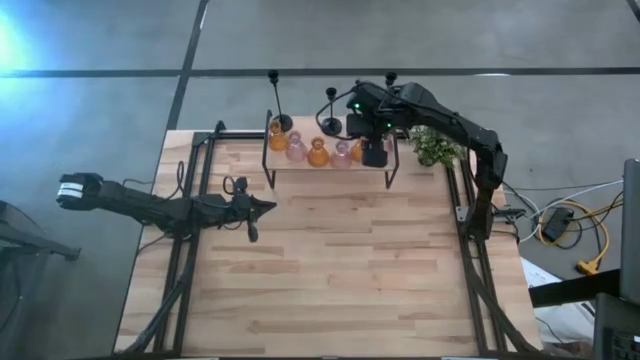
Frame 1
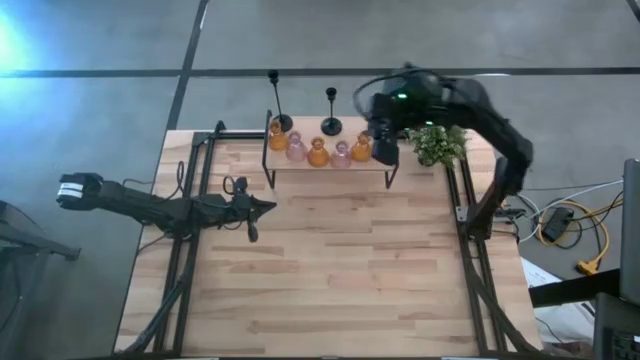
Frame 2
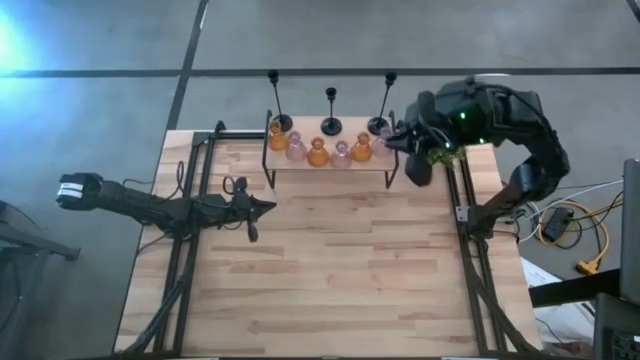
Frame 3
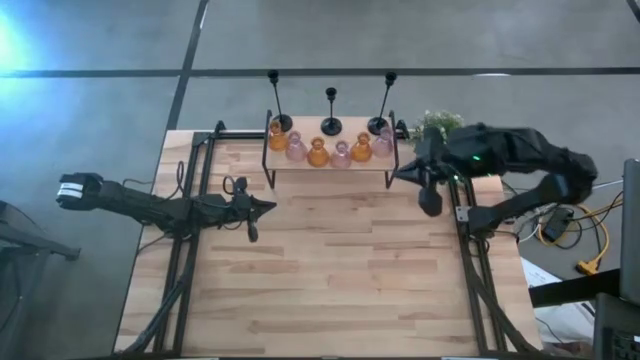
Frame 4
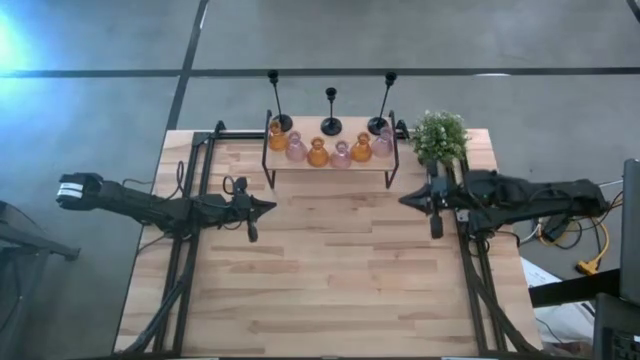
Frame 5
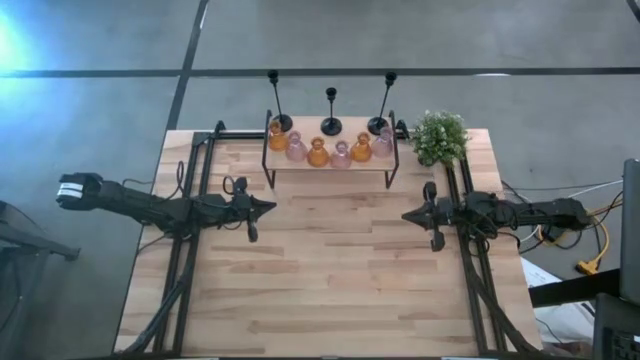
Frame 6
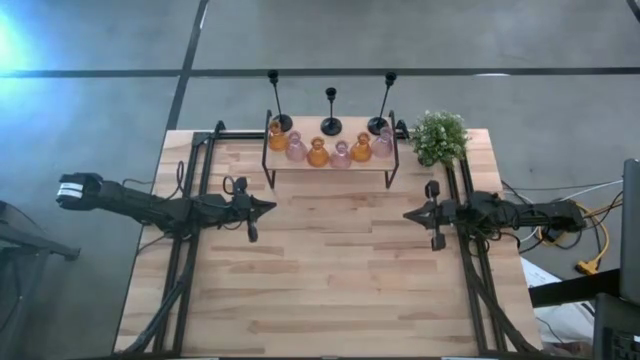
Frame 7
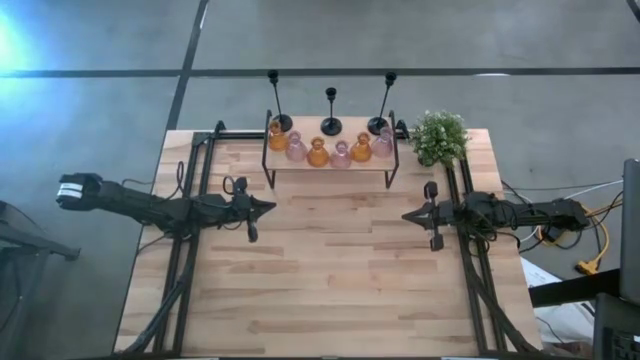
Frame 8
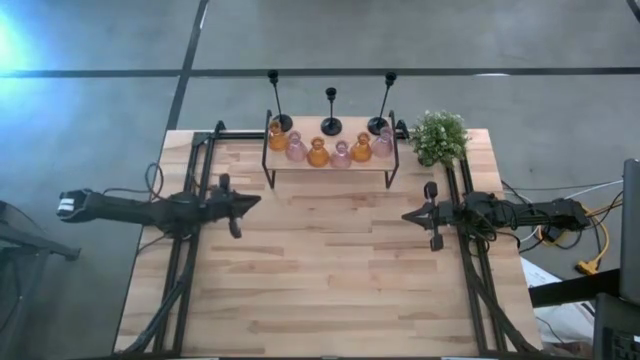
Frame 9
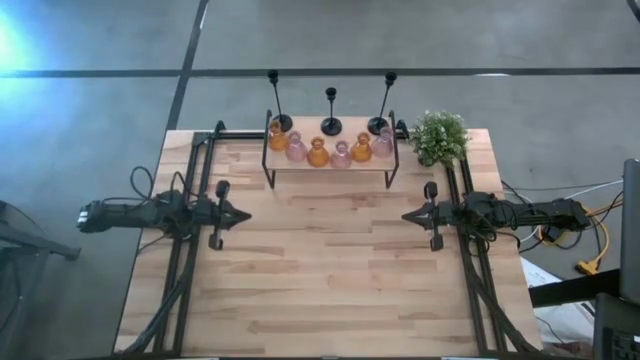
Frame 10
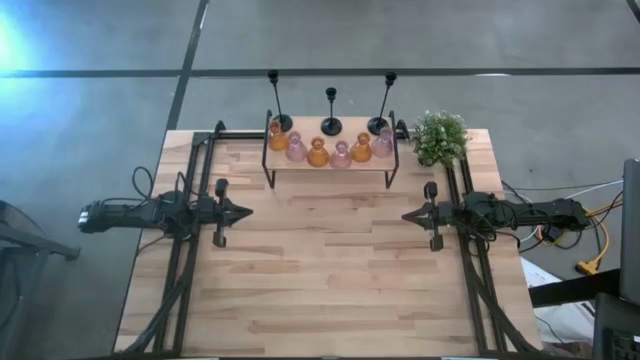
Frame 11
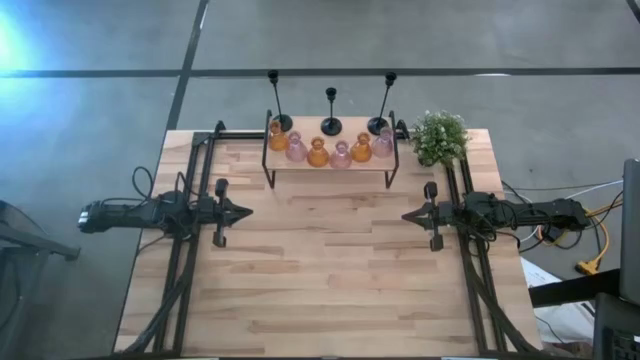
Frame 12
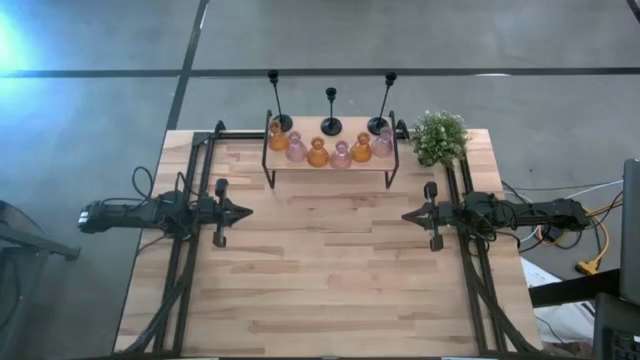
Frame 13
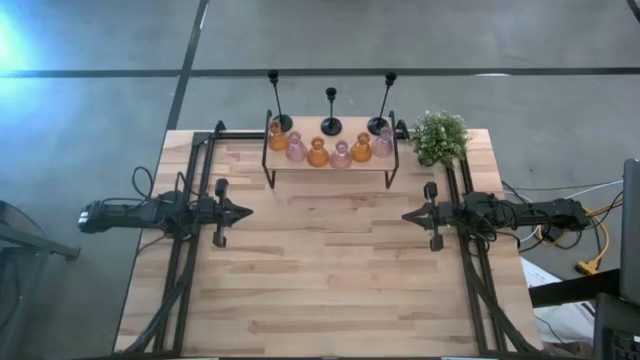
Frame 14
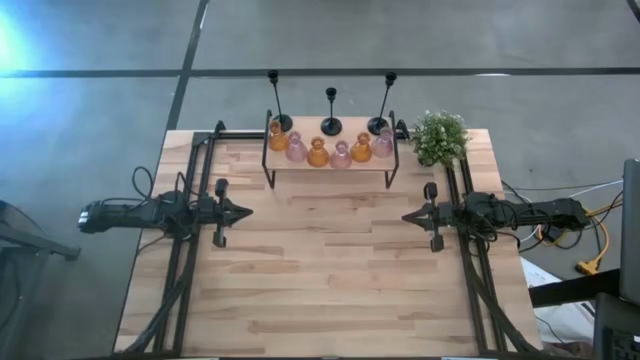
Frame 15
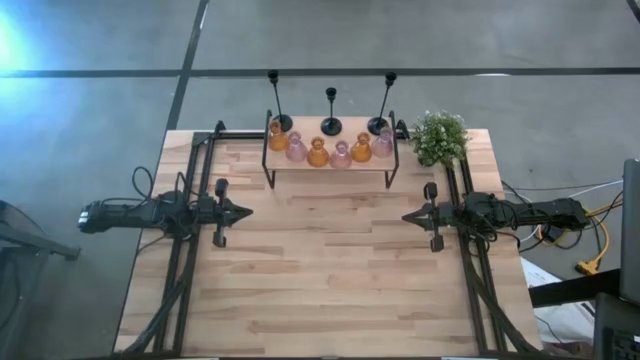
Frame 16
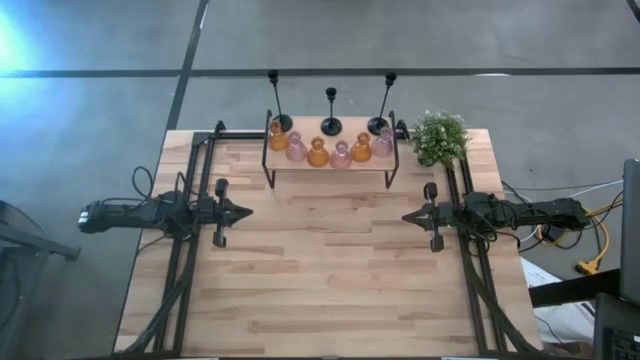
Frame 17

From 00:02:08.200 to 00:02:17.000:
Task: Pick & Place candle stick holders
Return to Home Position

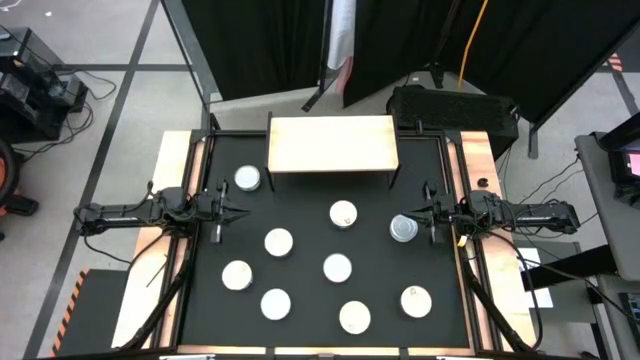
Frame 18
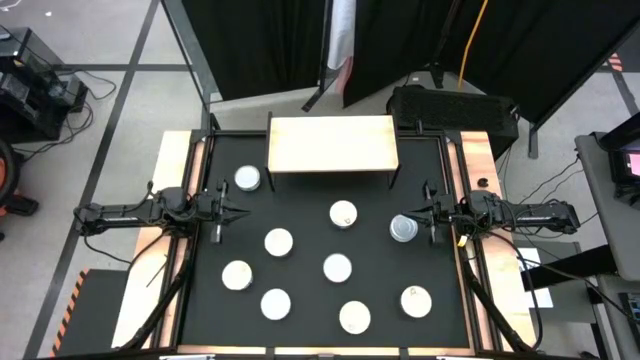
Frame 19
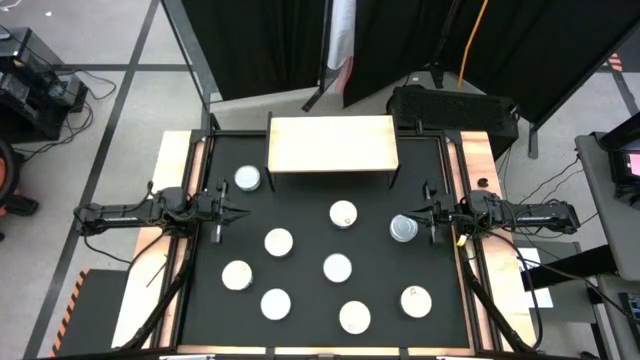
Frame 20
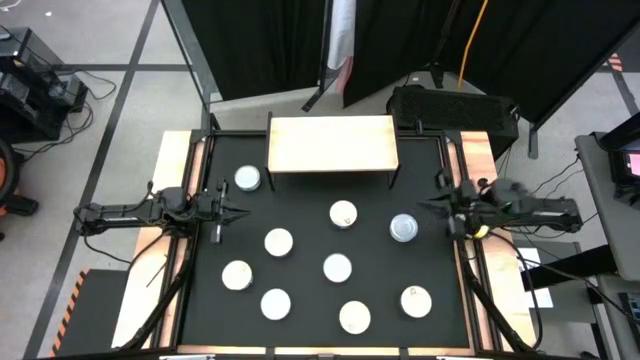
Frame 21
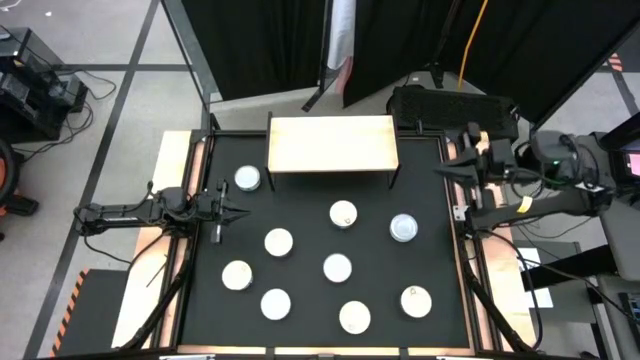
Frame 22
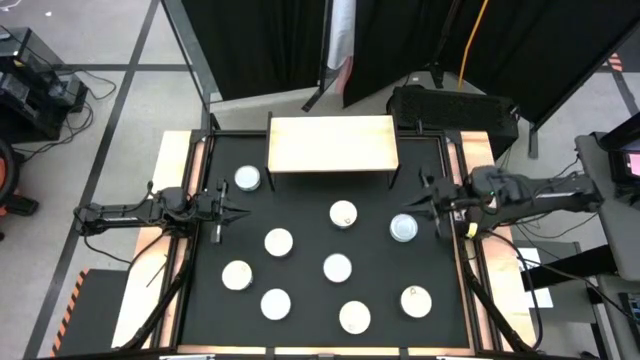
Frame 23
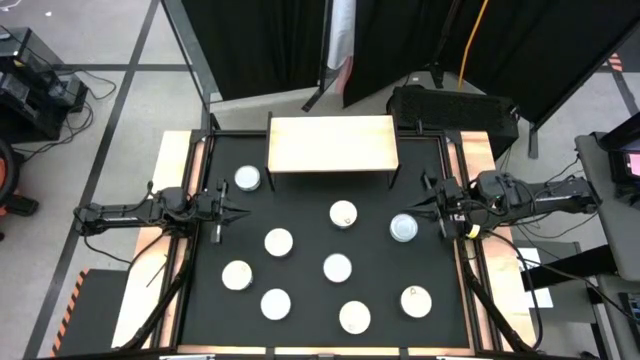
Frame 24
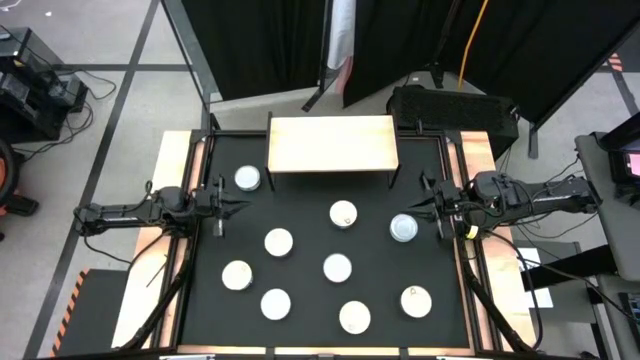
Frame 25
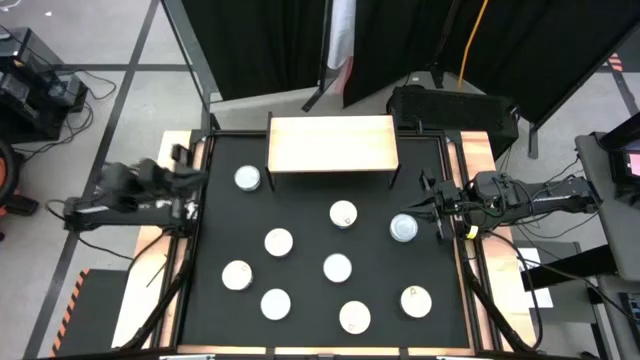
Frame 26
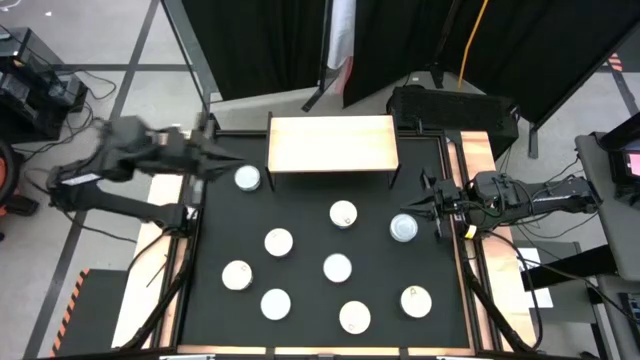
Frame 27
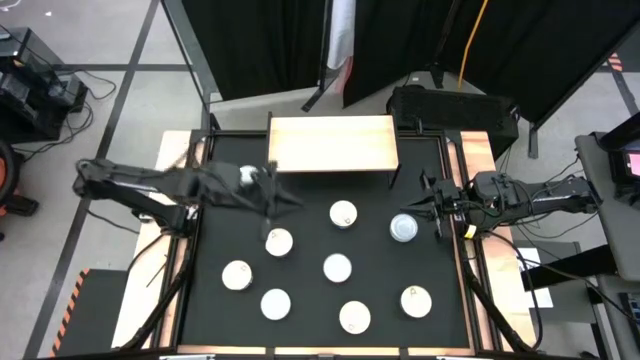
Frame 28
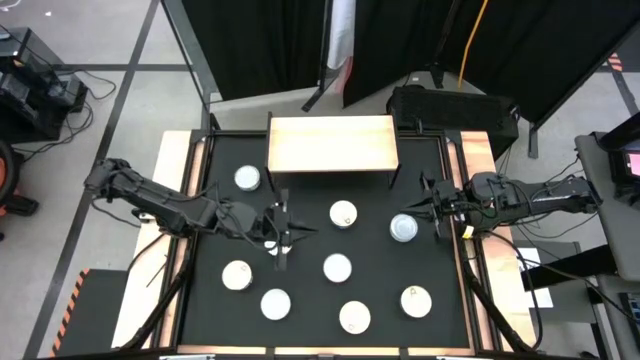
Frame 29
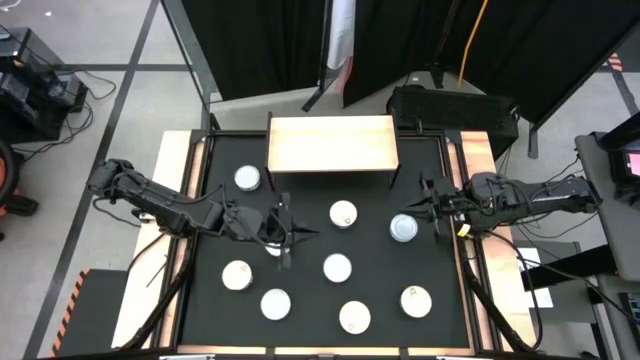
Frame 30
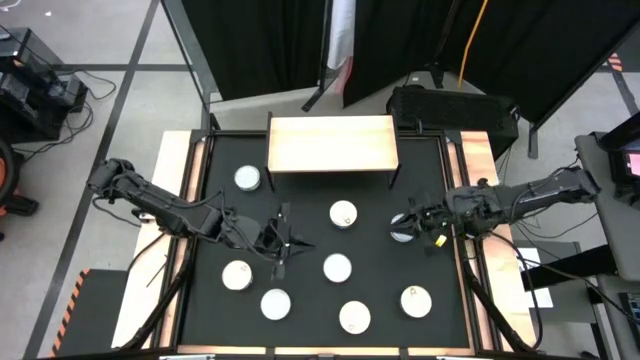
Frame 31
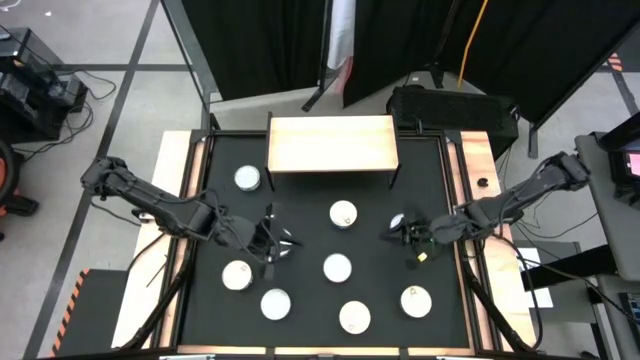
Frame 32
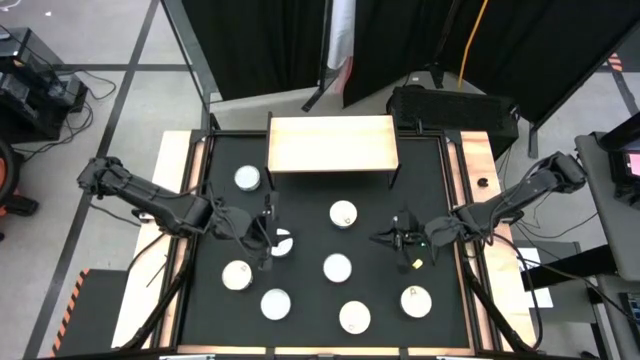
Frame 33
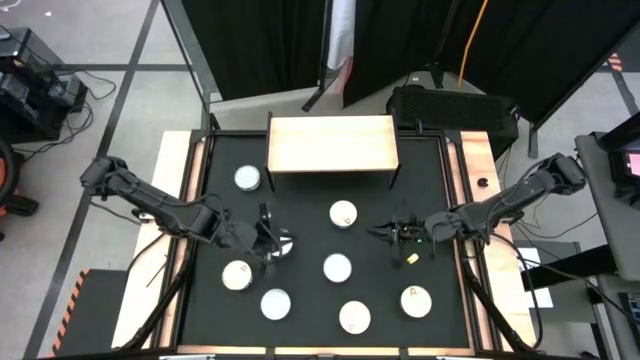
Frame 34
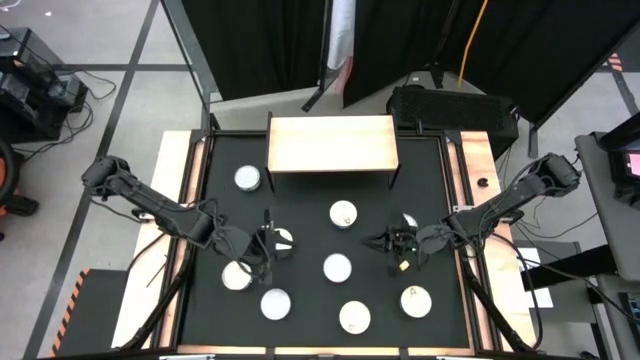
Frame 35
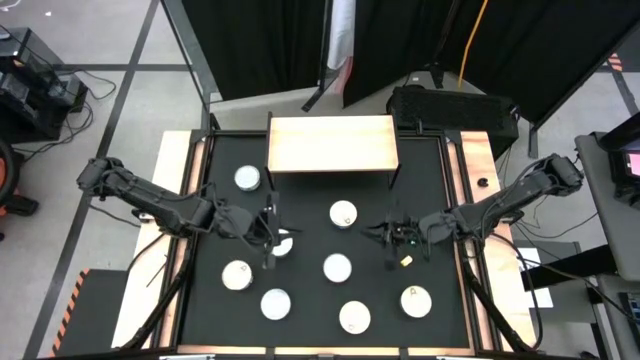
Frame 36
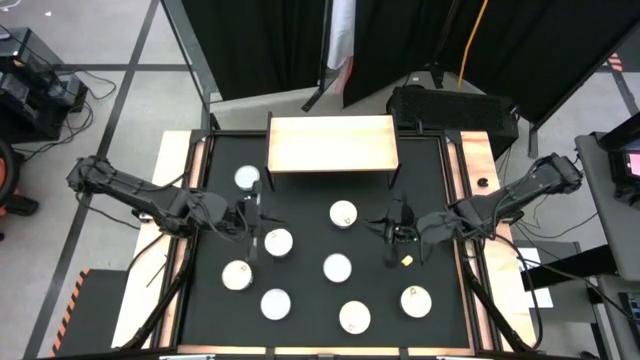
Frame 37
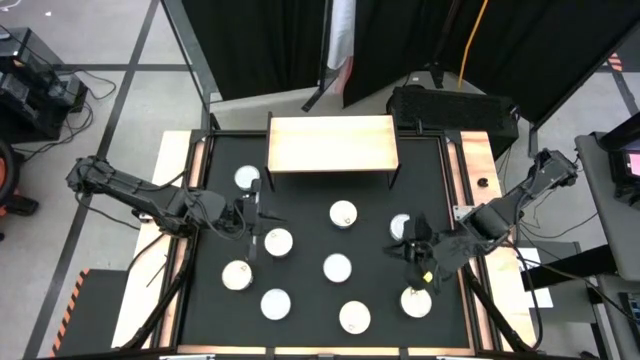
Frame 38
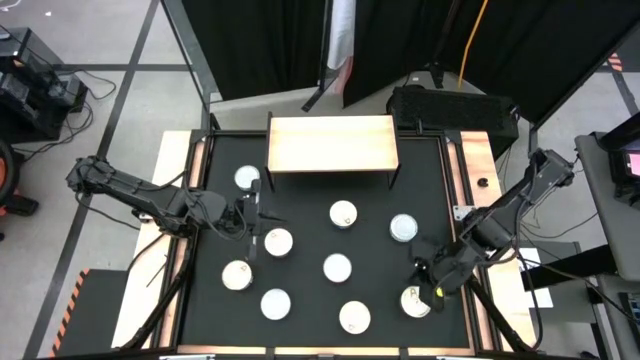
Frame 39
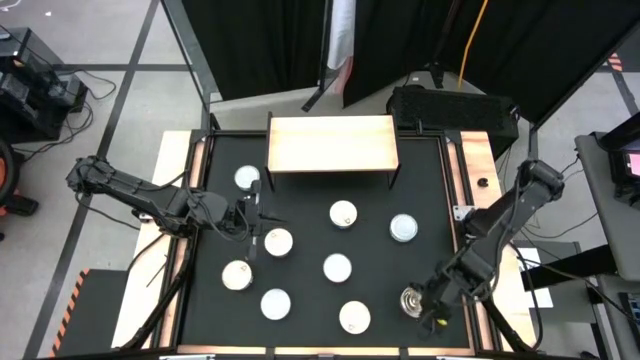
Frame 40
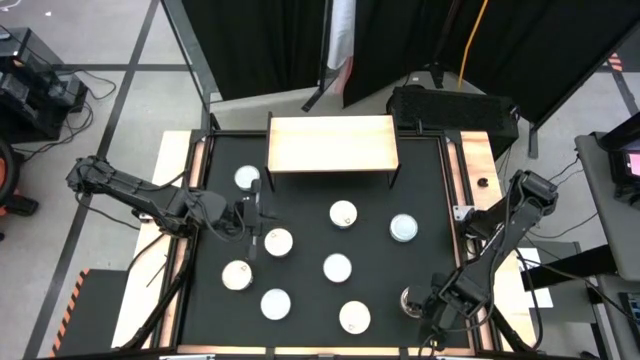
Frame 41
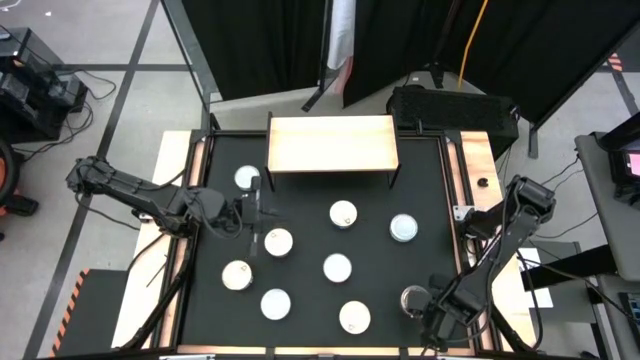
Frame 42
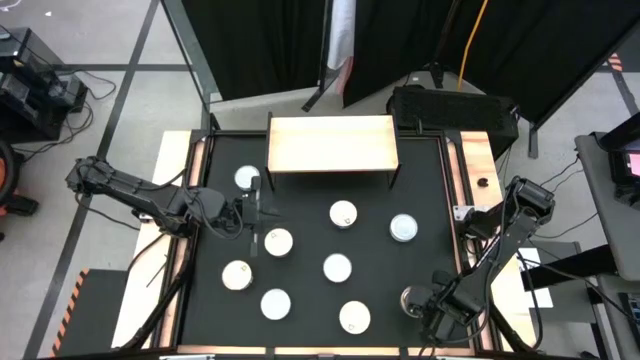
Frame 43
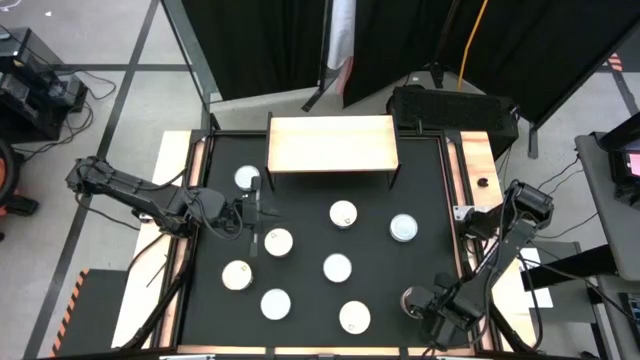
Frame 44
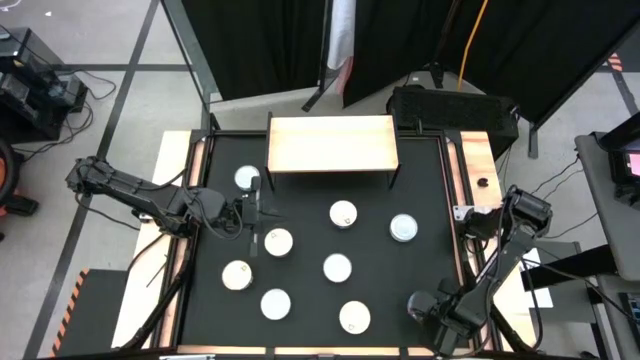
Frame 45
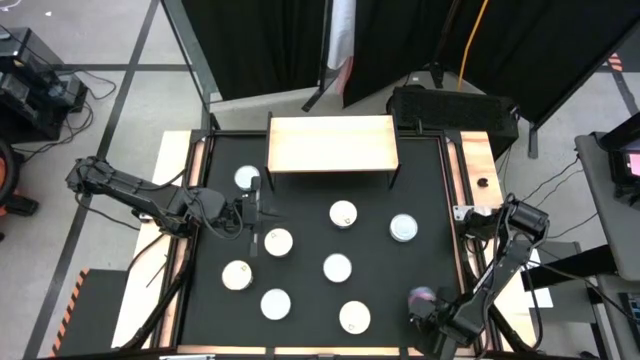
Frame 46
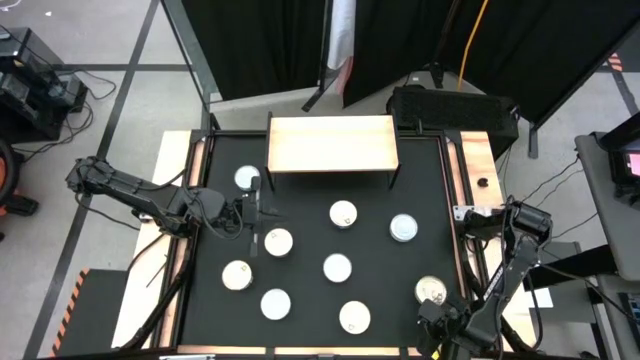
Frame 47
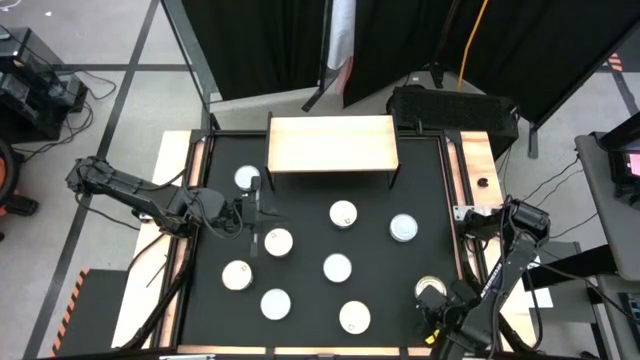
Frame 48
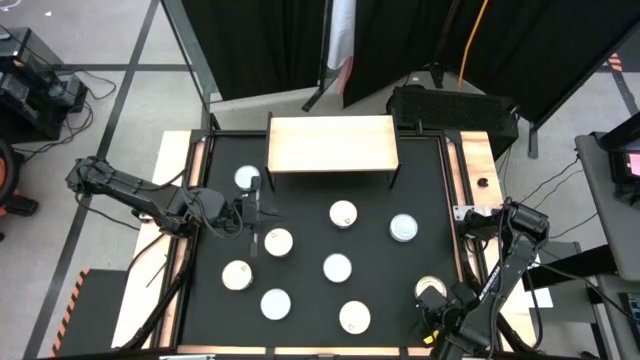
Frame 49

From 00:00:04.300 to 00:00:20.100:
Task: Stack canned seafood by type on shelf
Put the blue pink tuna can on the shelf
